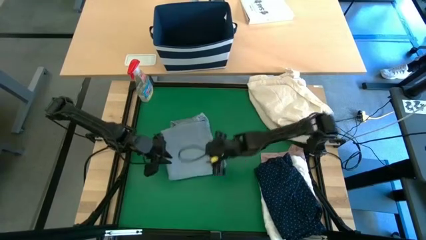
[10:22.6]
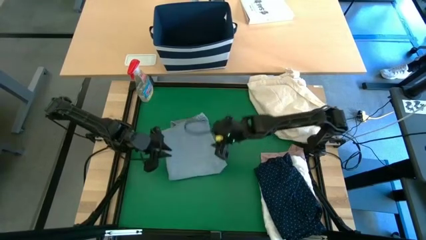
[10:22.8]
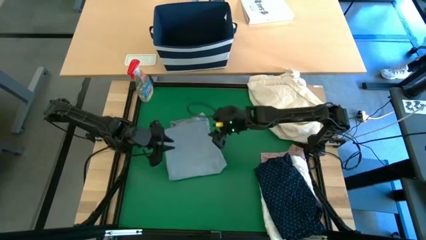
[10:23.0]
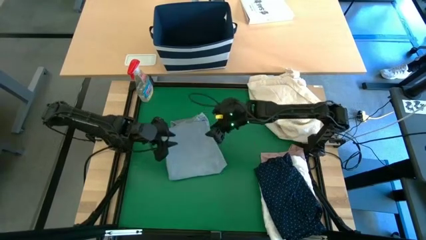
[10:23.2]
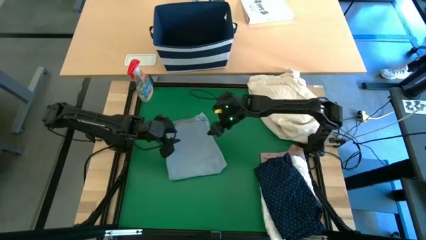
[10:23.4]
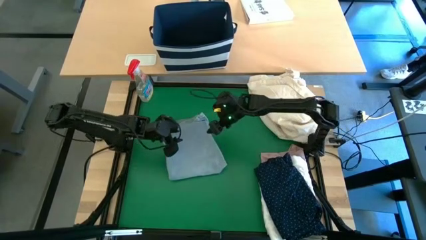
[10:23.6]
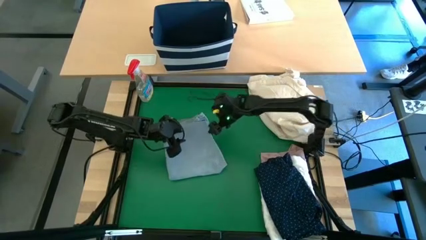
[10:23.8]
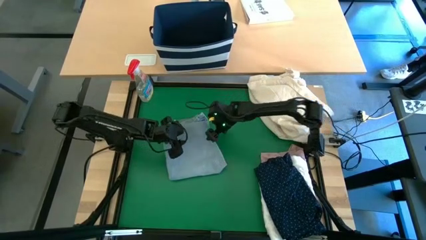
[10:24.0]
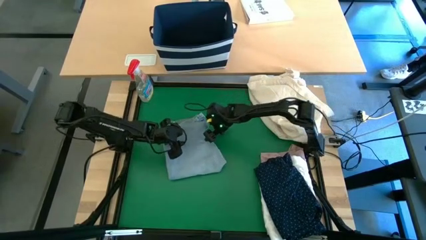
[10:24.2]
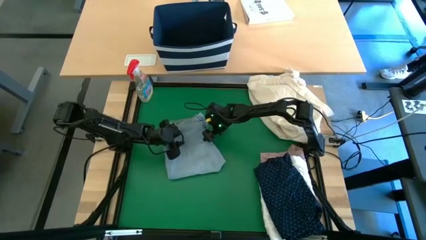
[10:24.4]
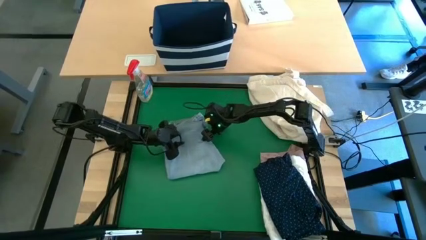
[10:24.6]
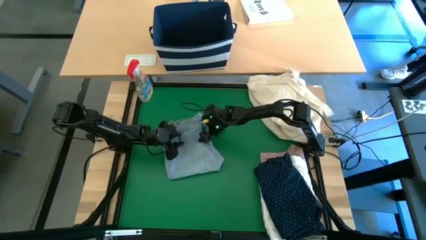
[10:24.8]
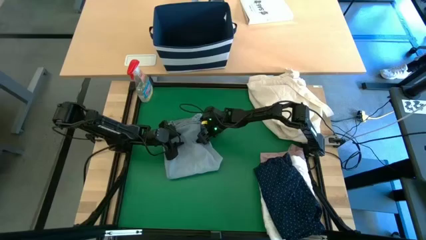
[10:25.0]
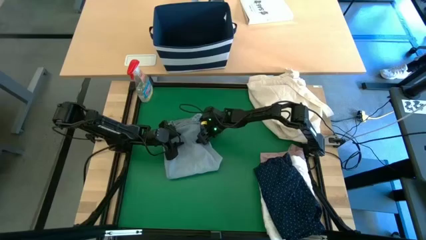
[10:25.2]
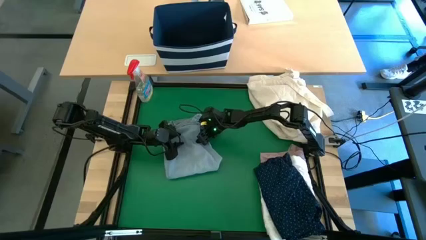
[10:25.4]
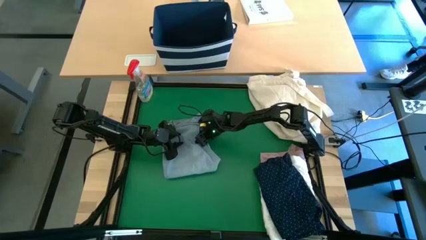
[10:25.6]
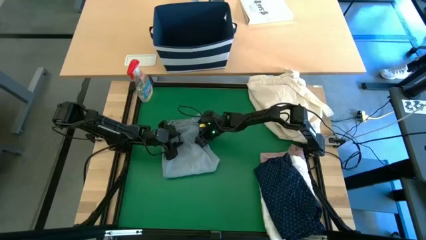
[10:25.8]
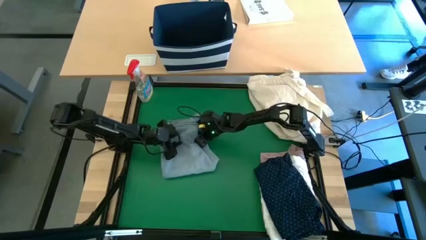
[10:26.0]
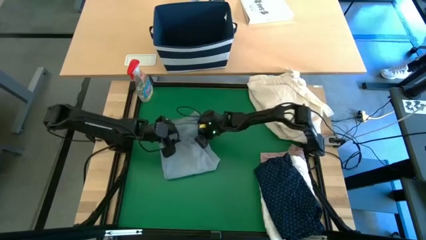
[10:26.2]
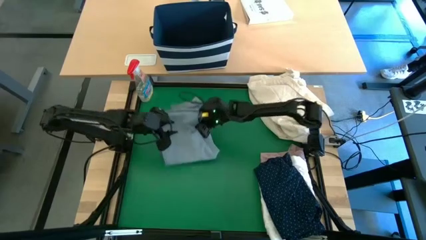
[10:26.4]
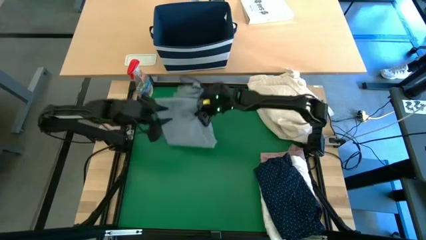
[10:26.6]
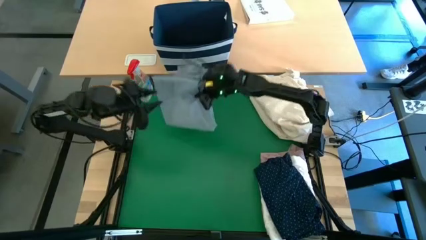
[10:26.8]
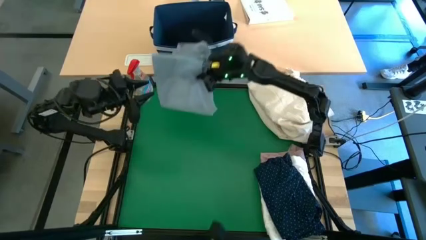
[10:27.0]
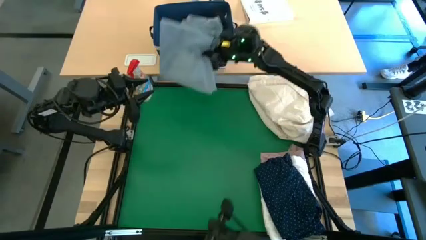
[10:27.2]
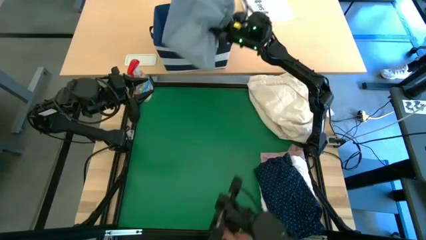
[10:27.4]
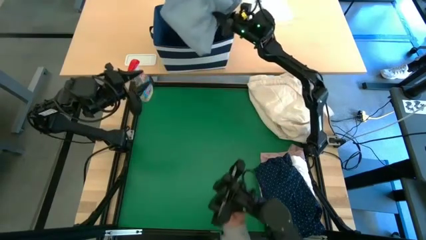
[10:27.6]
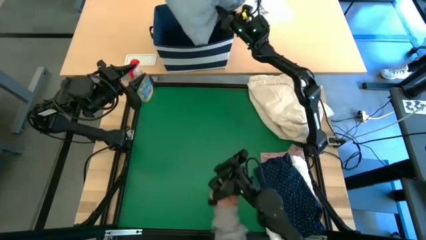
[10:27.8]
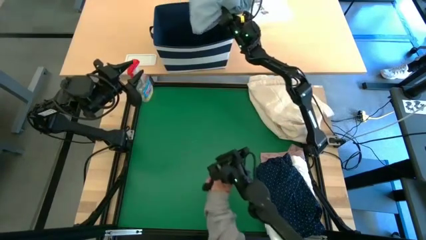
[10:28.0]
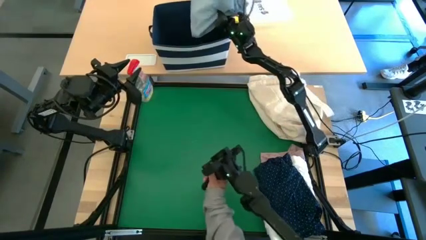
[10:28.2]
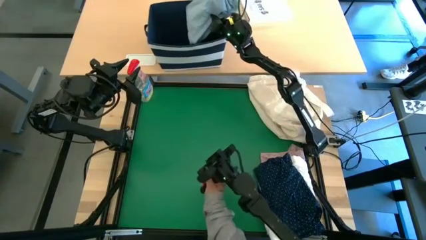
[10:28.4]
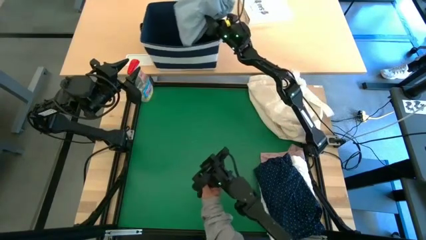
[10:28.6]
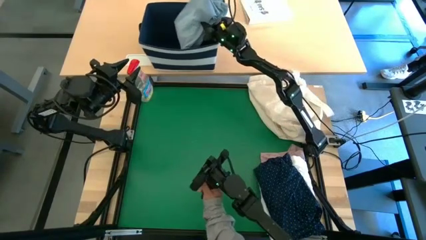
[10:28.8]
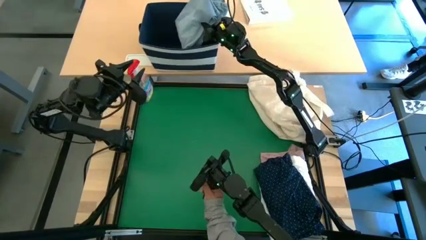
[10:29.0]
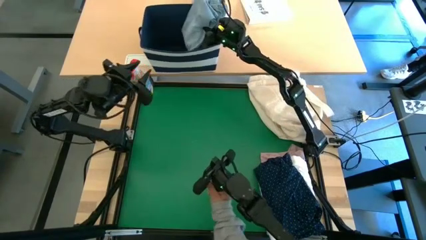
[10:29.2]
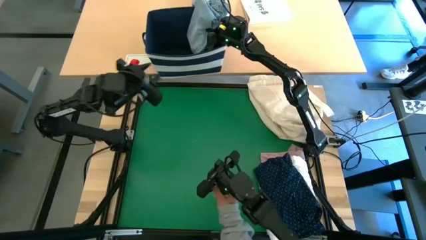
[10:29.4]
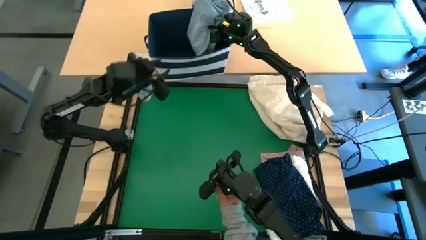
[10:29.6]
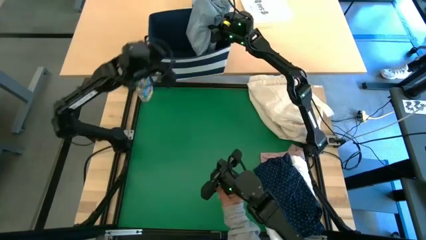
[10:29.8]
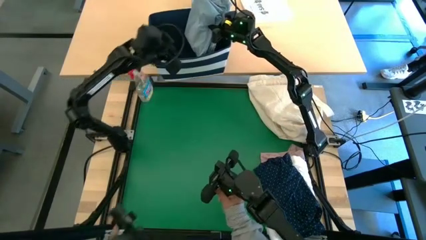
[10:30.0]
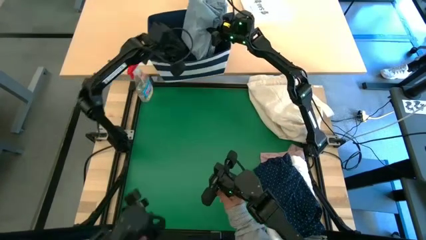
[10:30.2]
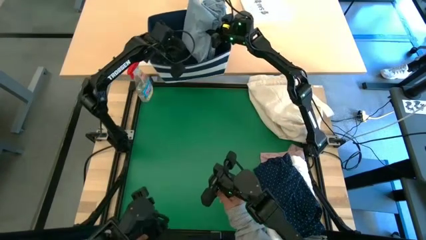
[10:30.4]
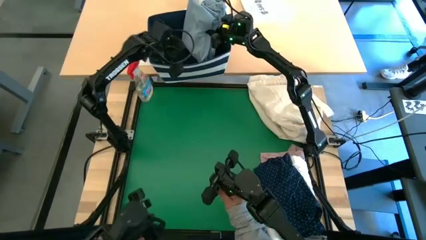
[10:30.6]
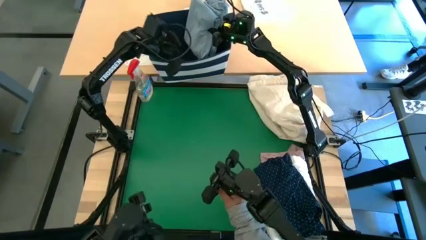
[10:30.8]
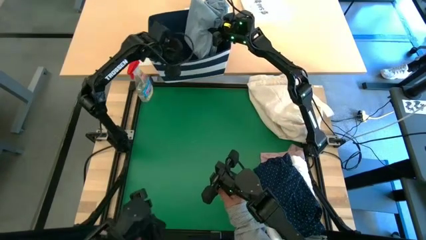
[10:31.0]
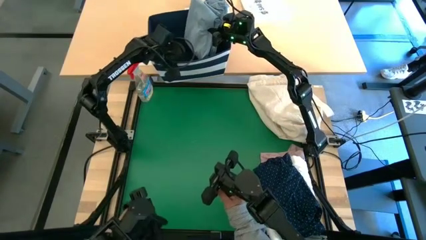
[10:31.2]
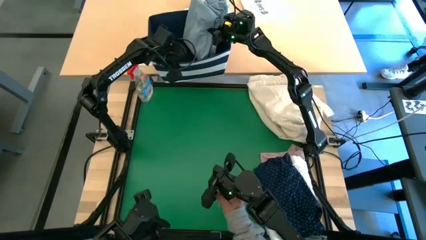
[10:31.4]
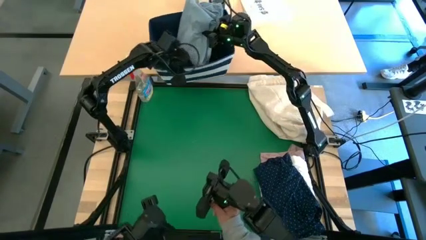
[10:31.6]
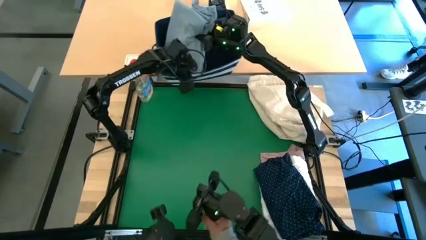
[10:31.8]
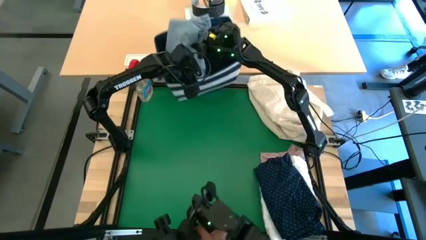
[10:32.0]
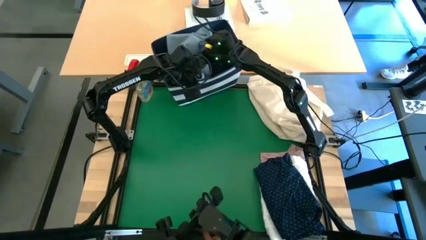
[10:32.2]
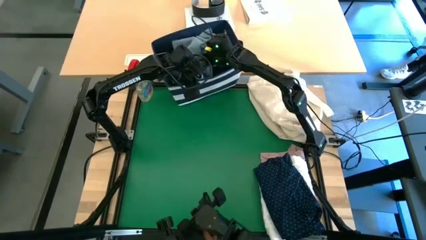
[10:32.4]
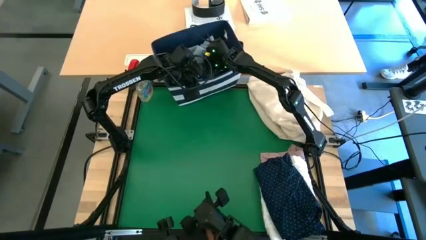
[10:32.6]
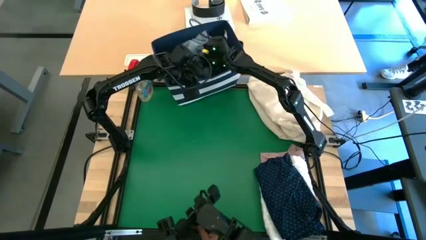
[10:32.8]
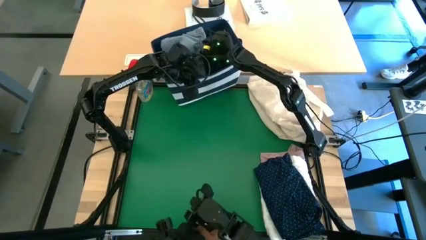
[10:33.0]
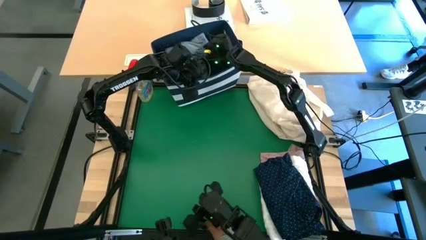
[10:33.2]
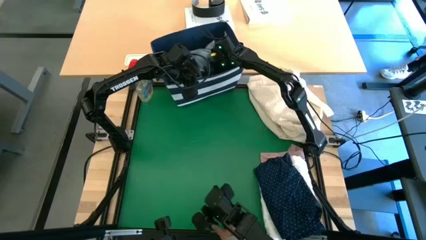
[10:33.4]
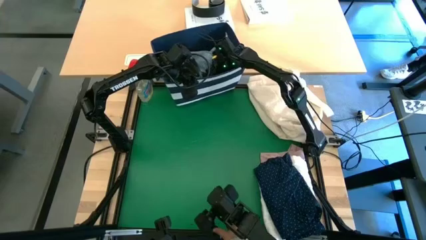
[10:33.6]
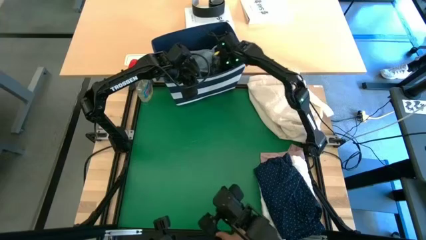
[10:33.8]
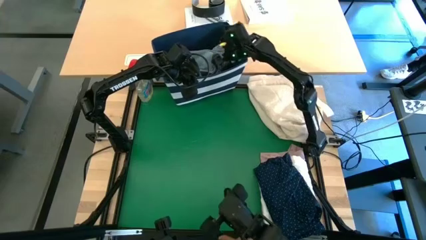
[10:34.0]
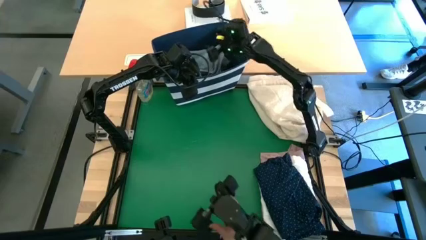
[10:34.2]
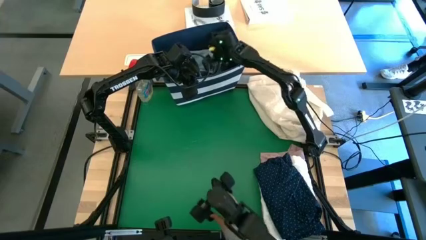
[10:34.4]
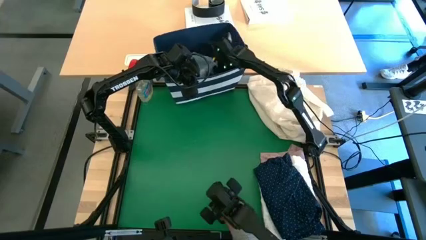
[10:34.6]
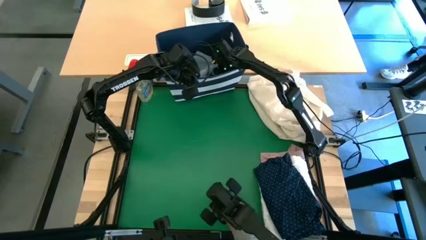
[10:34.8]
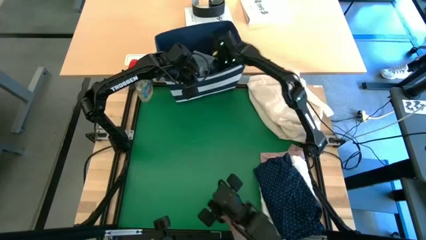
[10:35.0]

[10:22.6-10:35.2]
Task: Fold laundry
Put the blue jeans into the blue laundry bin

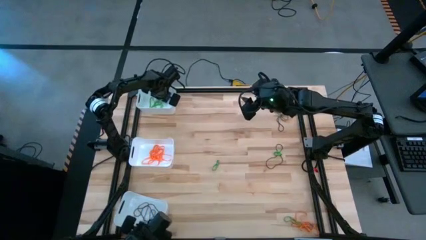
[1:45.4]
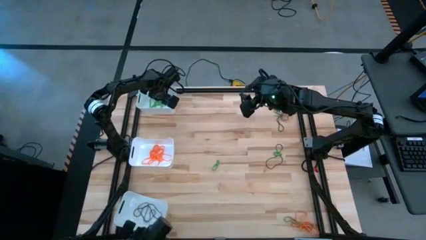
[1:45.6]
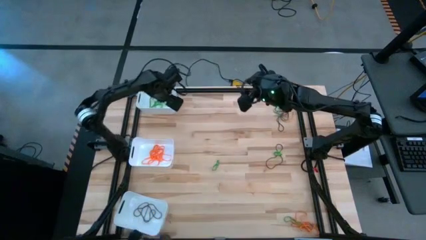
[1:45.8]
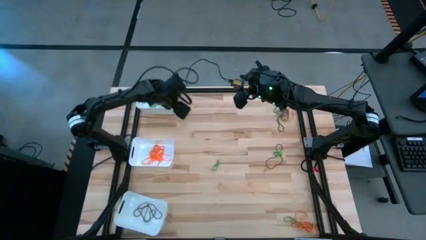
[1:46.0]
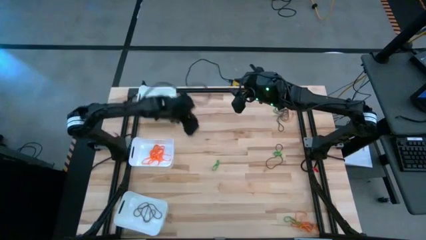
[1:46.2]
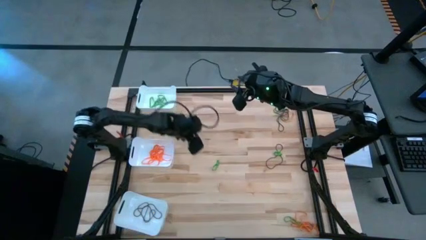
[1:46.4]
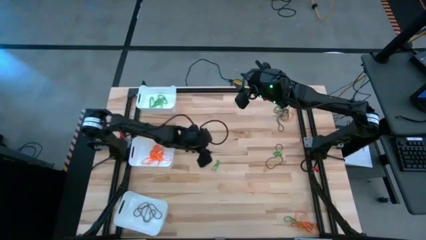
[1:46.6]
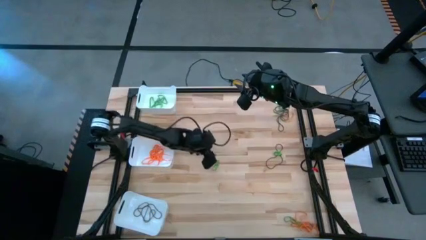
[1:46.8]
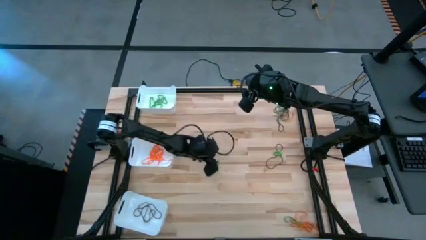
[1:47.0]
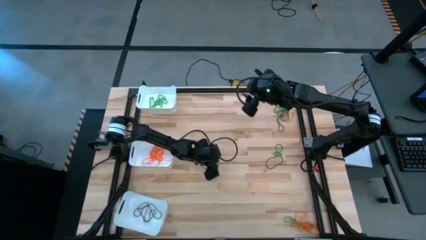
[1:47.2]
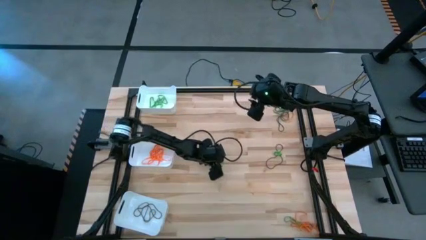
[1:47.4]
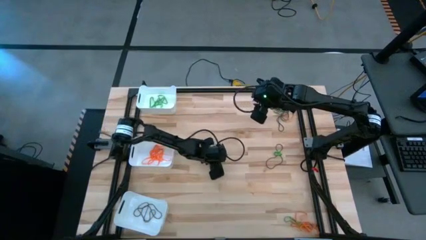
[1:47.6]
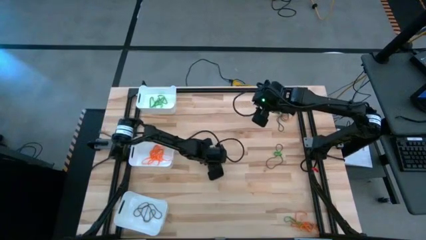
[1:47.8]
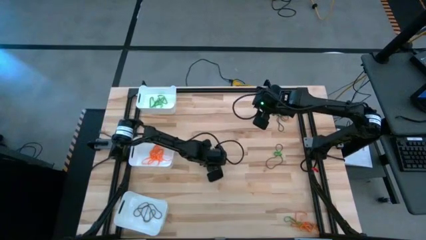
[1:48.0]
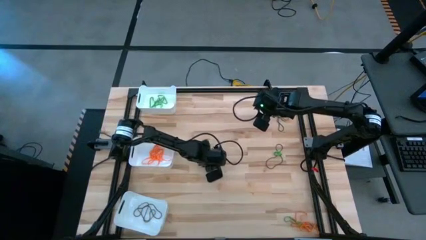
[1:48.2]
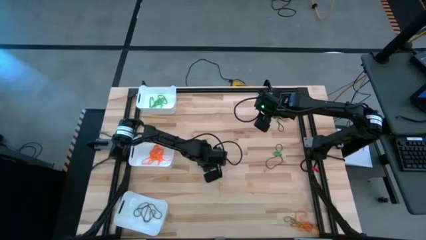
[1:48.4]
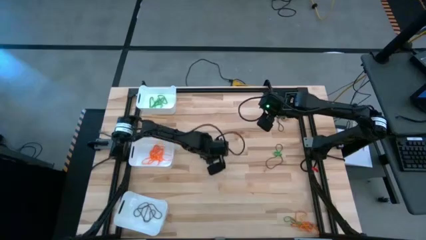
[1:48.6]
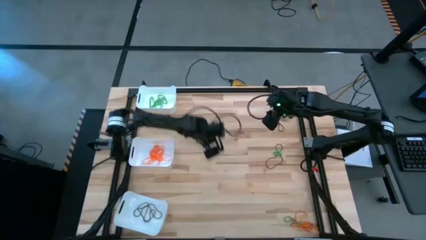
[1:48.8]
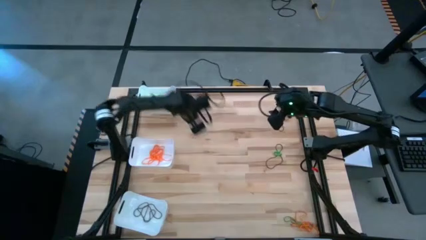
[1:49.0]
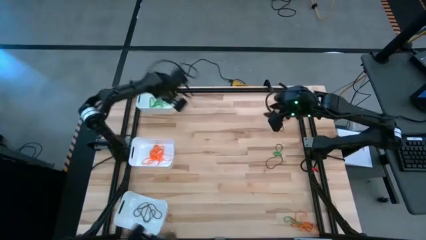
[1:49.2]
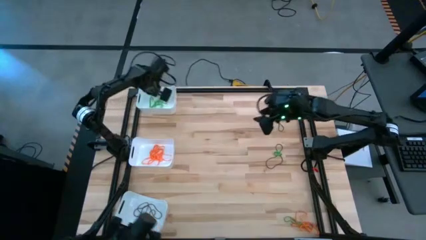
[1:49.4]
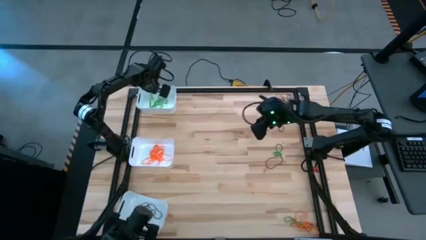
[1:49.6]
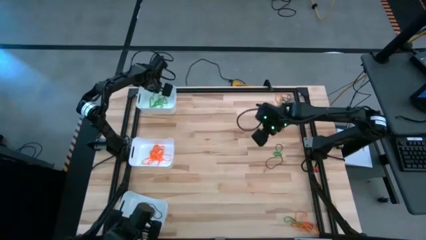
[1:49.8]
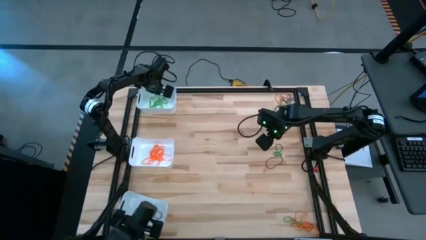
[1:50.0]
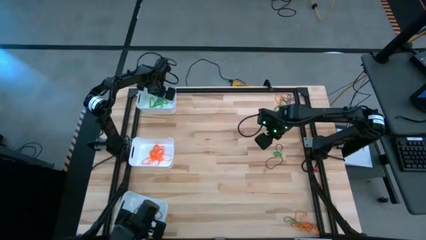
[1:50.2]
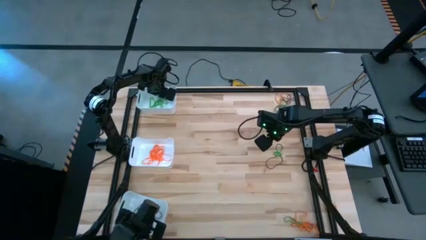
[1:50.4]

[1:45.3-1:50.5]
Task: Sort rubber bands into baskets
Put the green rubber band into the top white bin
